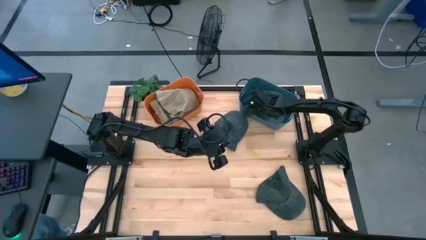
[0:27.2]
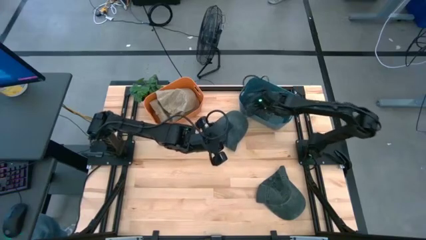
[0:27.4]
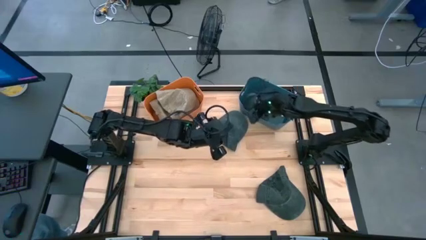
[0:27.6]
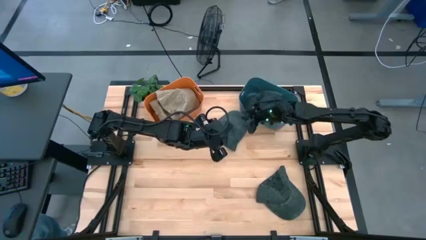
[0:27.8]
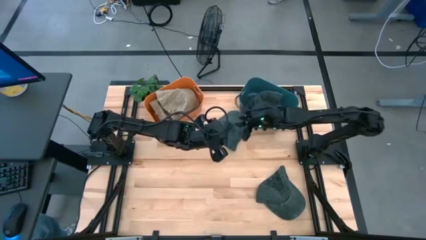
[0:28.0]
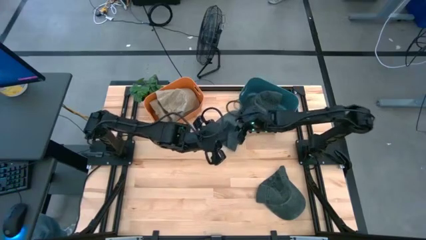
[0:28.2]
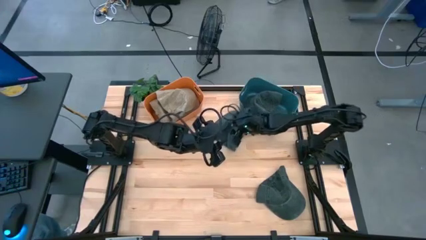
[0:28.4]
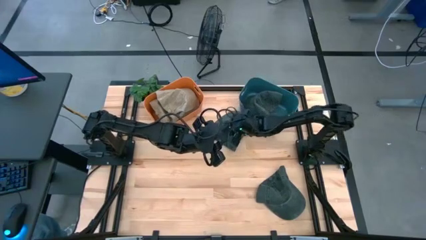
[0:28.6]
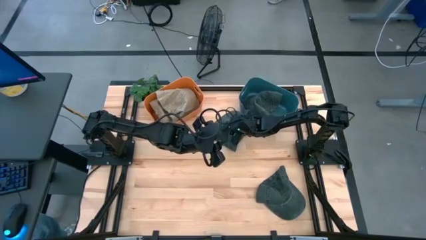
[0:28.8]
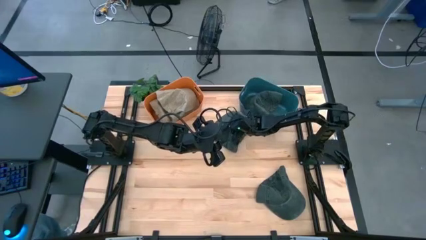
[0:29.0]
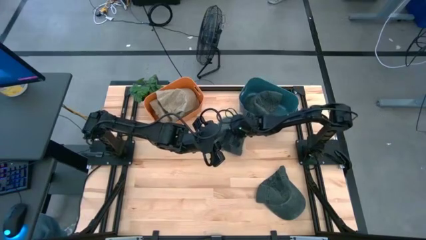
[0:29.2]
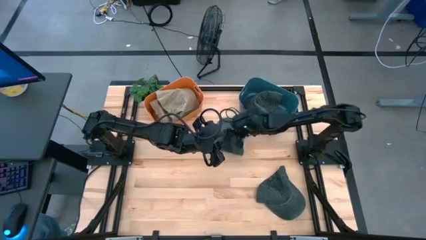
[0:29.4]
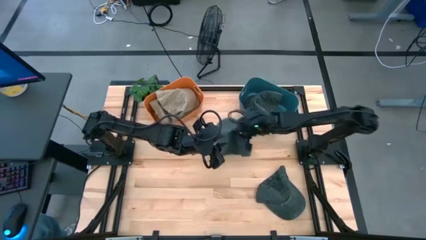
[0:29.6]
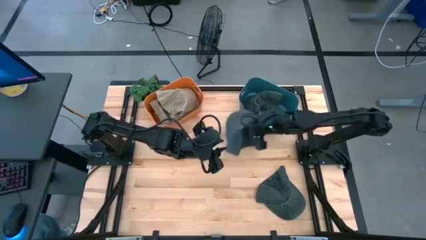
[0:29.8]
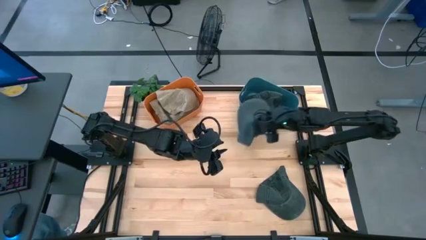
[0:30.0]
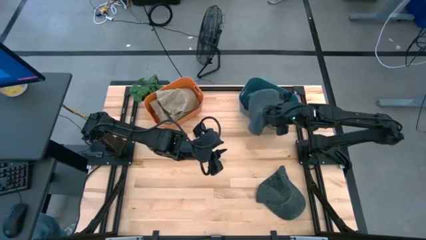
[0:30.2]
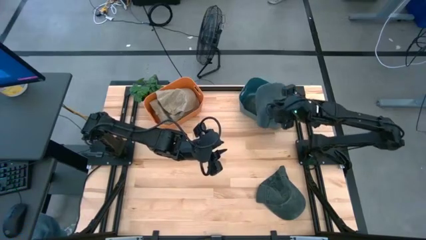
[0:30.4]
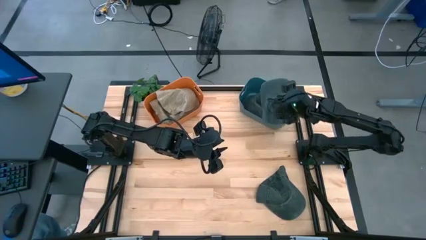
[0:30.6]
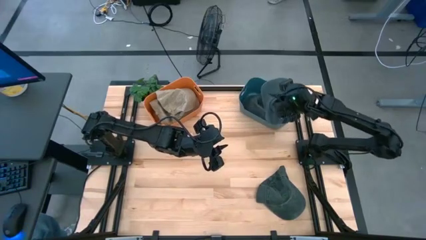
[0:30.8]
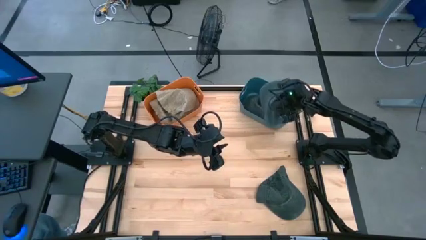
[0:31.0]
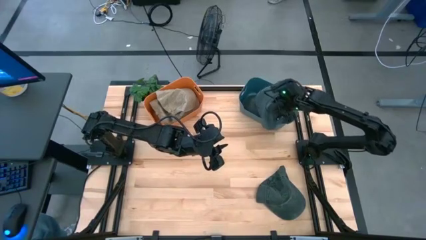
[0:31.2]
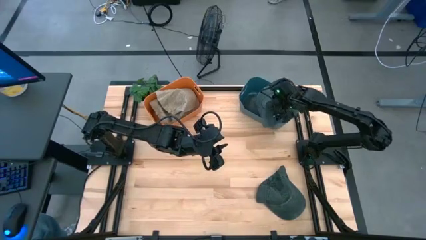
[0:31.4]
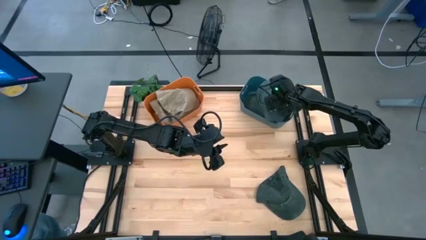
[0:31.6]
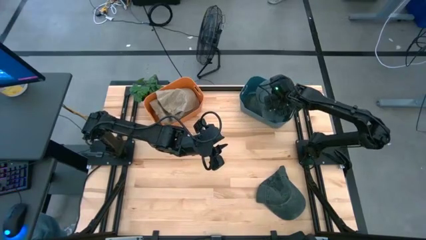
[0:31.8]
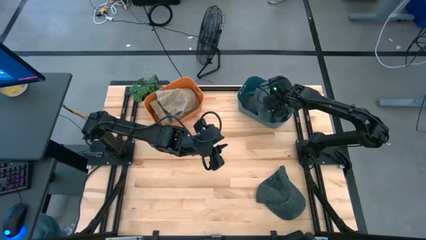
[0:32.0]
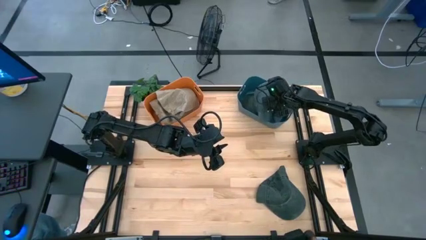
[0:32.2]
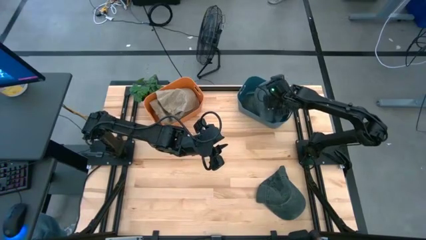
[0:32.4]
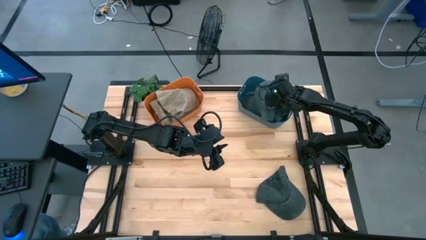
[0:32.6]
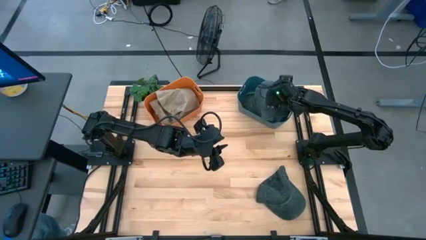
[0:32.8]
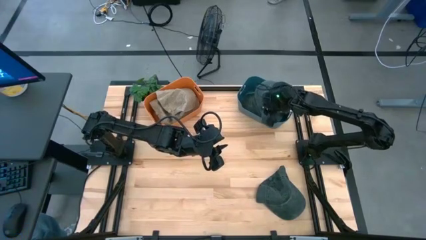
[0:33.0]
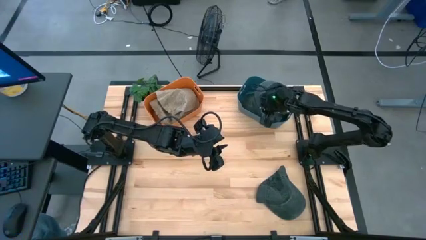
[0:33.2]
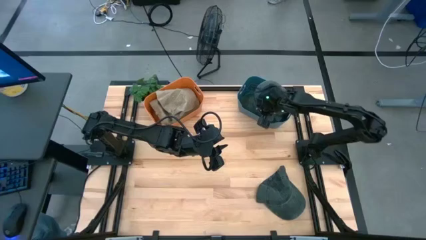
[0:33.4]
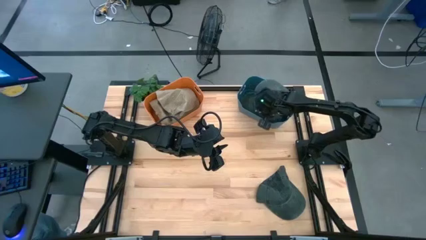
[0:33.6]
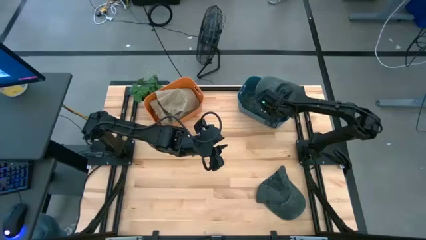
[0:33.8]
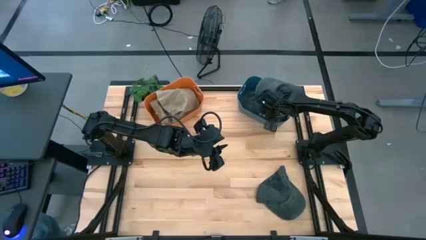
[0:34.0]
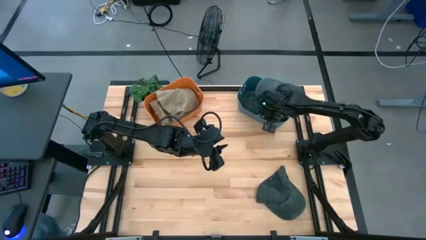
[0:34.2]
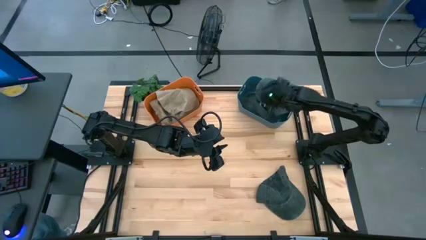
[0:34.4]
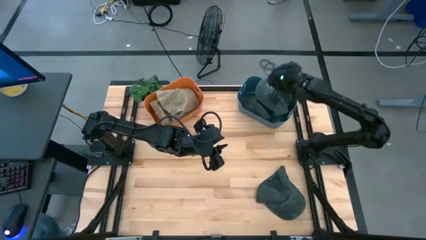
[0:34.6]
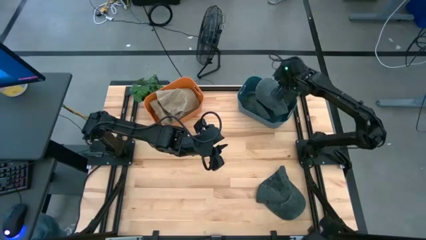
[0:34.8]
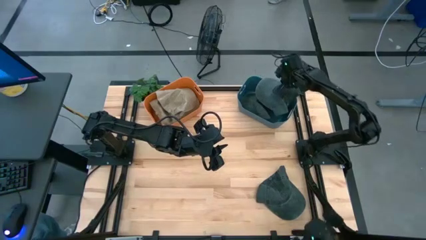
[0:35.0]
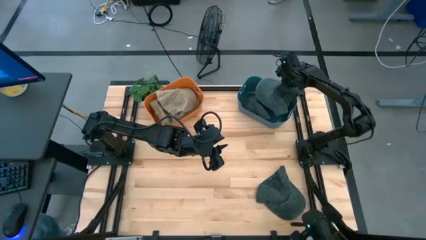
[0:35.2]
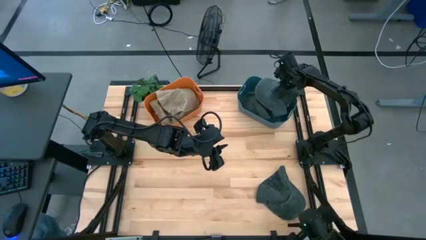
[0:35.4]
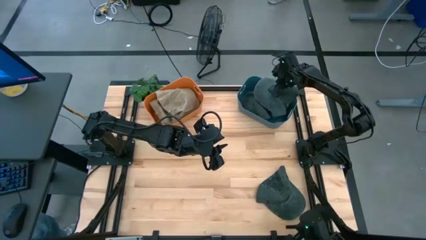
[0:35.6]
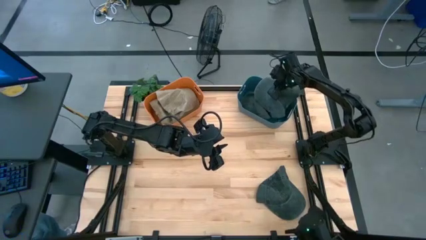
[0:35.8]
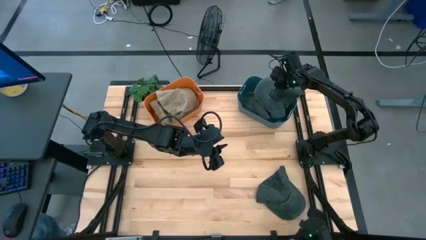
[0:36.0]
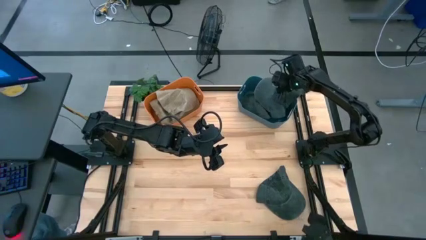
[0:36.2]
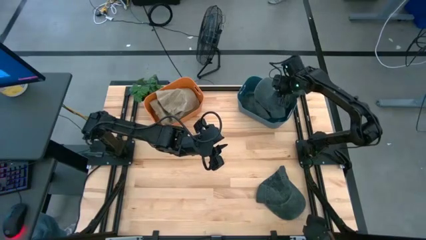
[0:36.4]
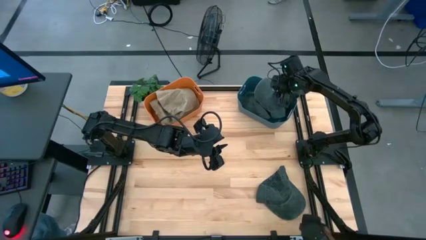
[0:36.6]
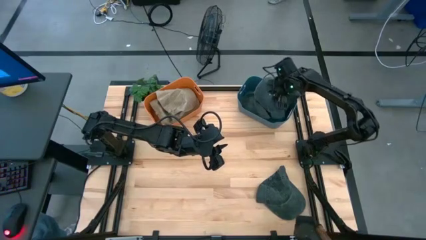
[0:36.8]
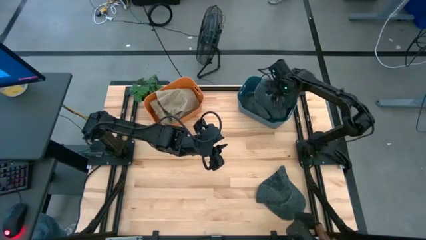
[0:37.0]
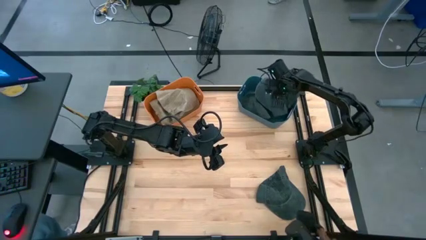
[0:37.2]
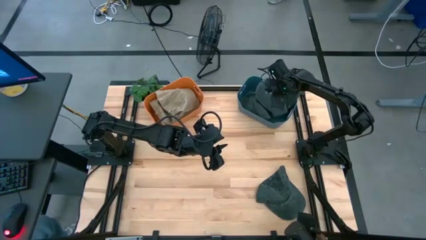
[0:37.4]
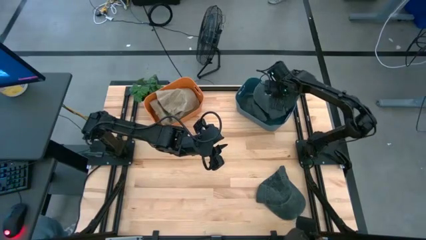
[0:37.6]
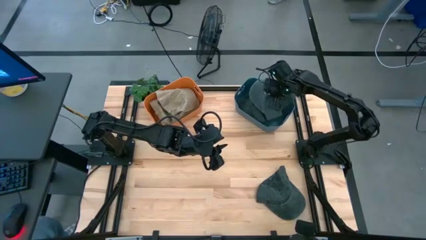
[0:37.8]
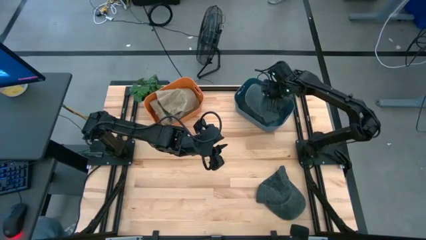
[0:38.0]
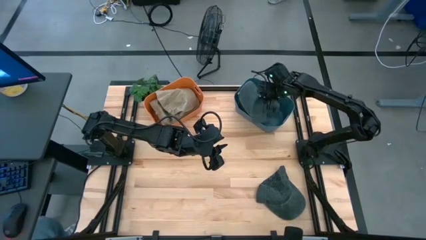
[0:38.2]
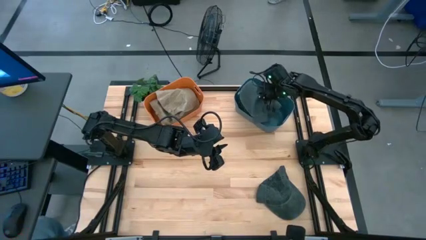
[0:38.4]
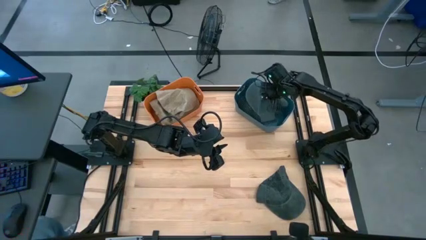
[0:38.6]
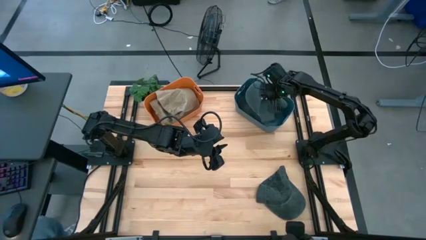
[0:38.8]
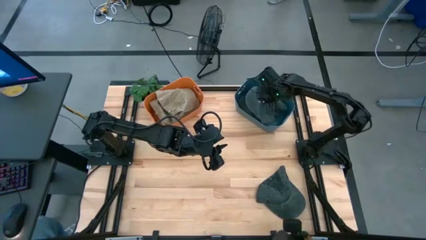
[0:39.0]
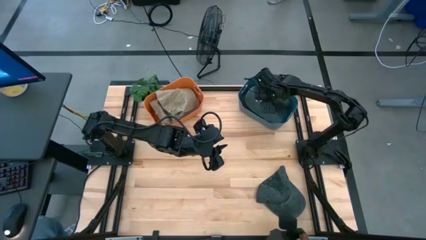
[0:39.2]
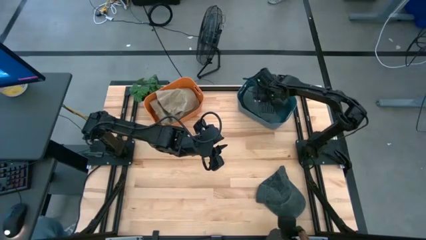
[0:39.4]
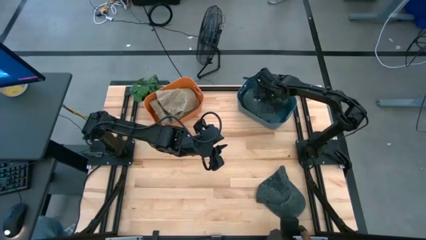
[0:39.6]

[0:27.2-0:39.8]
Task: Pick & Place hat
Put the top black cap into the dark blue bin

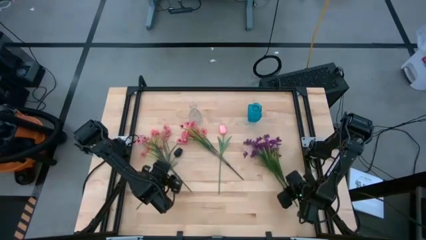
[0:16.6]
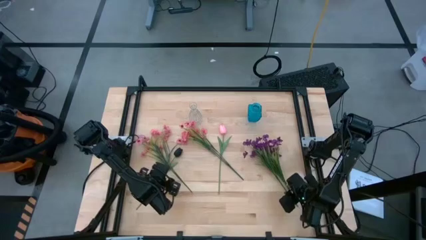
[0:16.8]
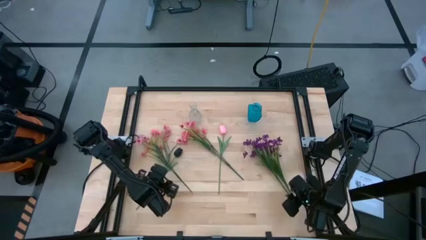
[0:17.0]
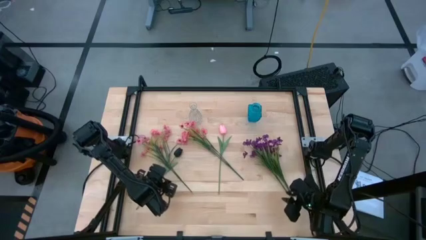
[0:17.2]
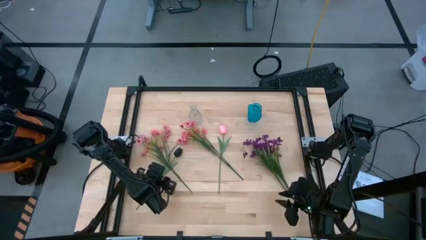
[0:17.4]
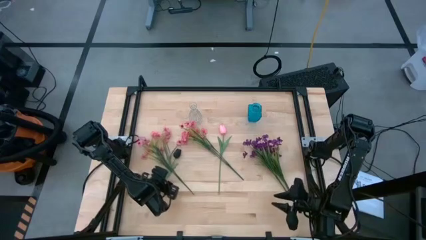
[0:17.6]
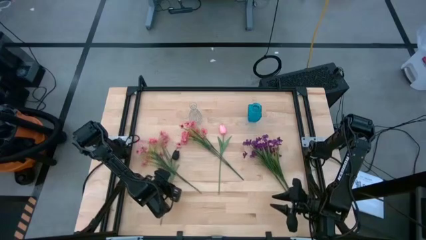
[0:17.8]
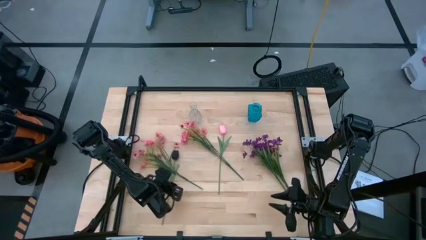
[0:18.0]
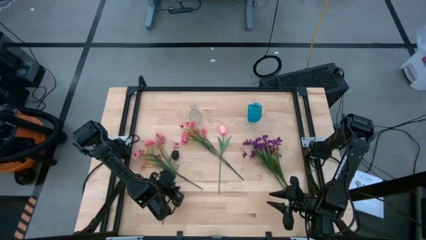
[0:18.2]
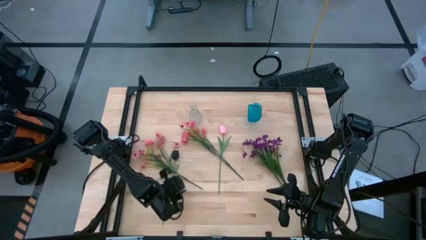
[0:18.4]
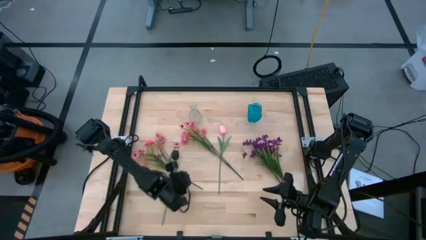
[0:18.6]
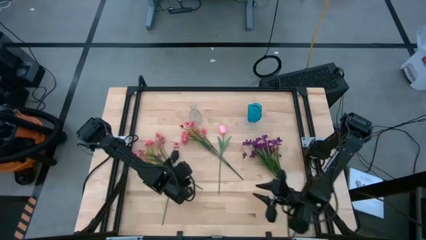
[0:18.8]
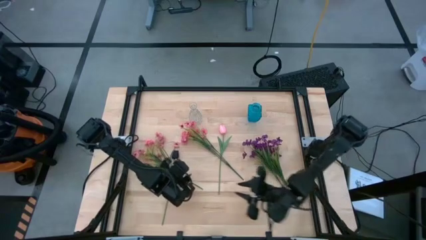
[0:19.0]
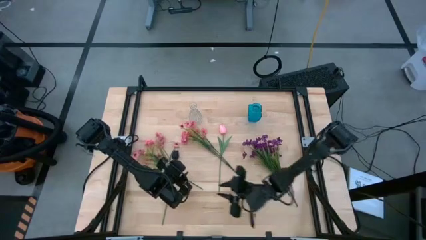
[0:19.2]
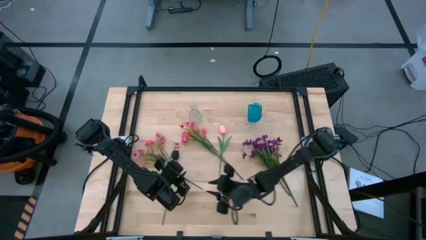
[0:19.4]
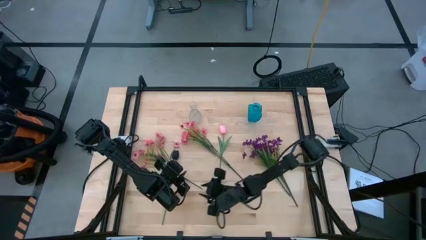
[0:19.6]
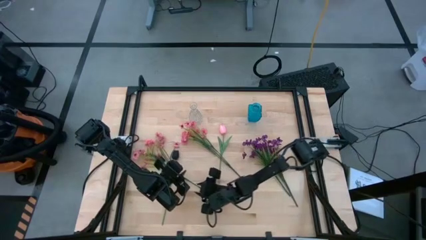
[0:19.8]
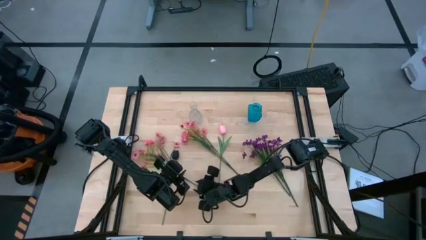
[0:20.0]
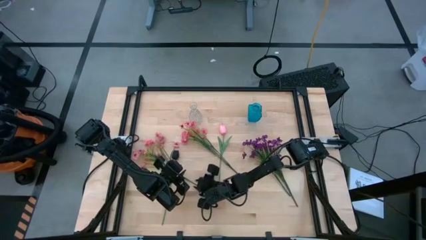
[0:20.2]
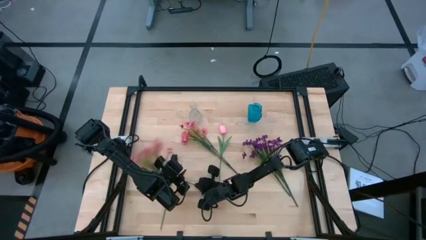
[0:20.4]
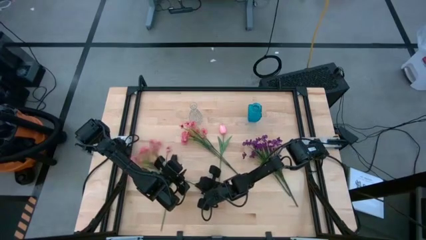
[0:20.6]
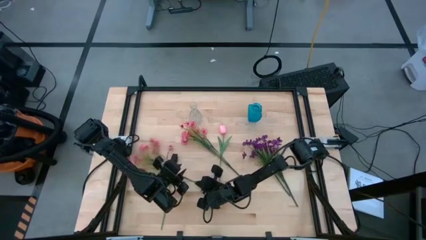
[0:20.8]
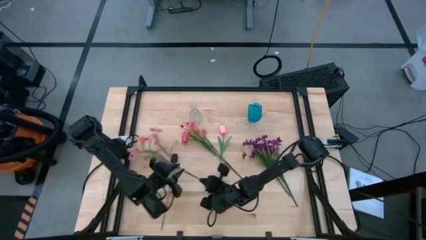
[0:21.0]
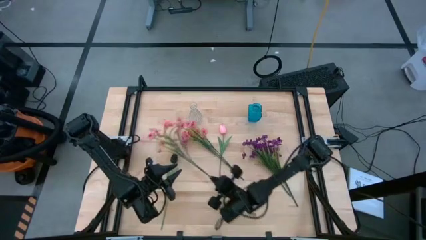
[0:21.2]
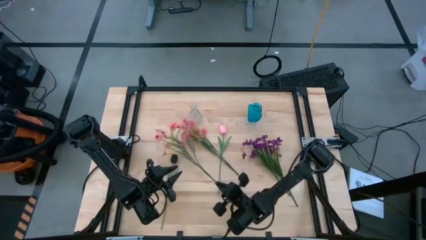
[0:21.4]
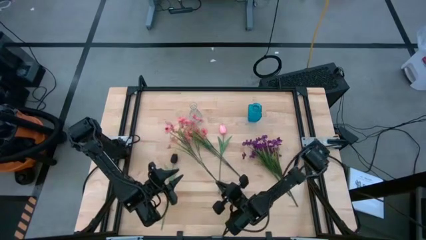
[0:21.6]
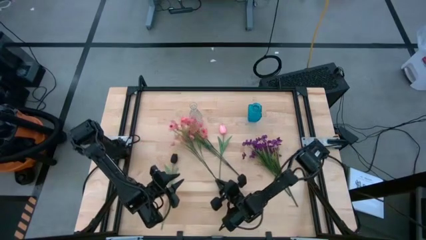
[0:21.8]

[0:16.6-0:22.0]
Task: Sort flowers into vase by color
Move the left pink flower to the center of the table
